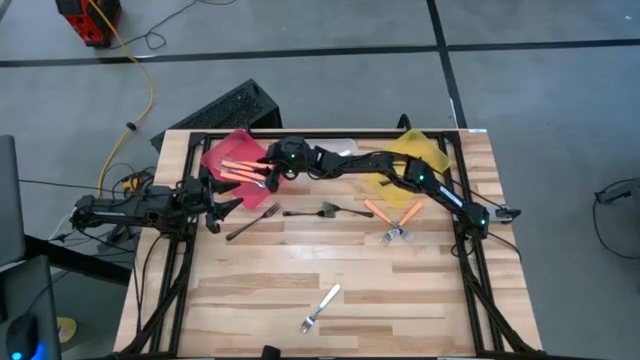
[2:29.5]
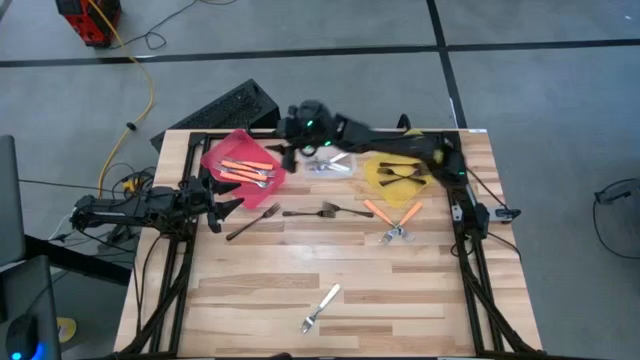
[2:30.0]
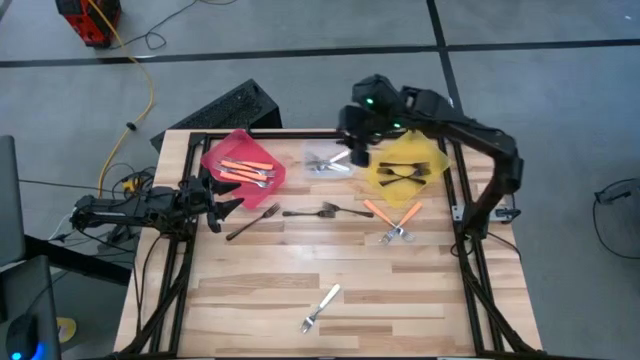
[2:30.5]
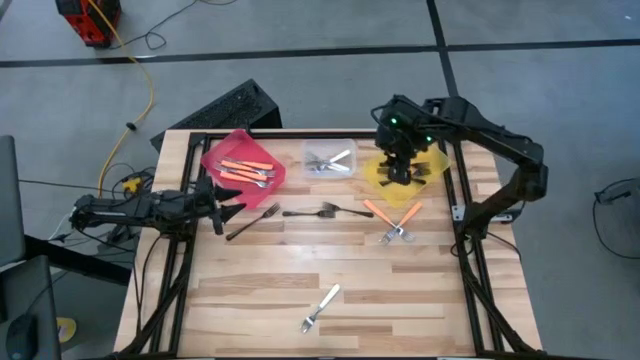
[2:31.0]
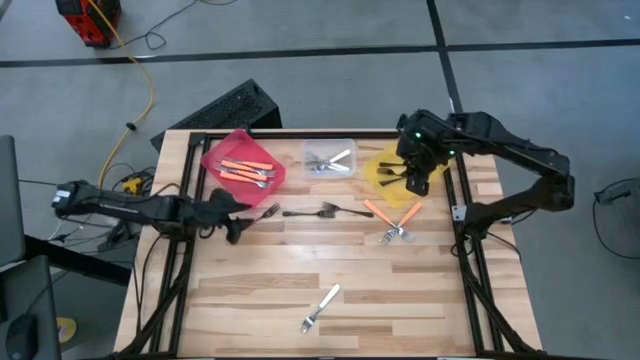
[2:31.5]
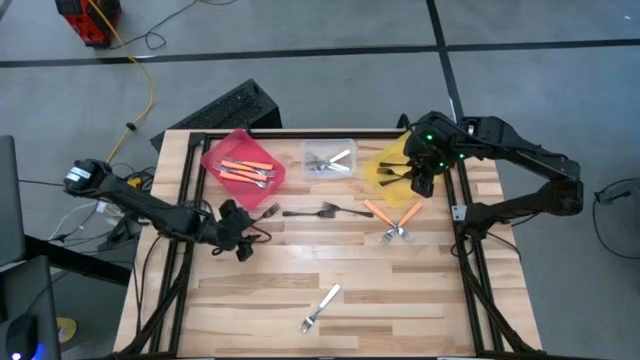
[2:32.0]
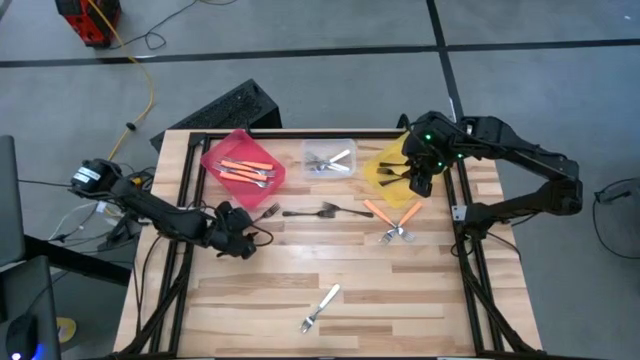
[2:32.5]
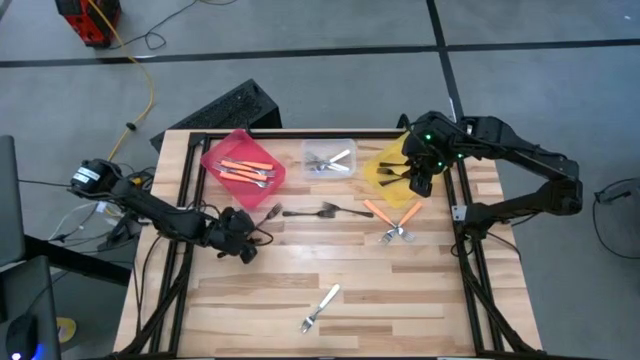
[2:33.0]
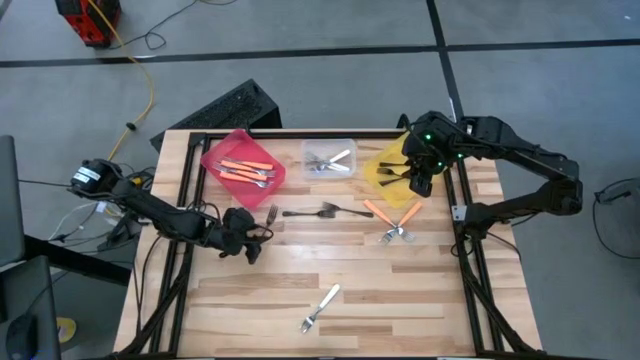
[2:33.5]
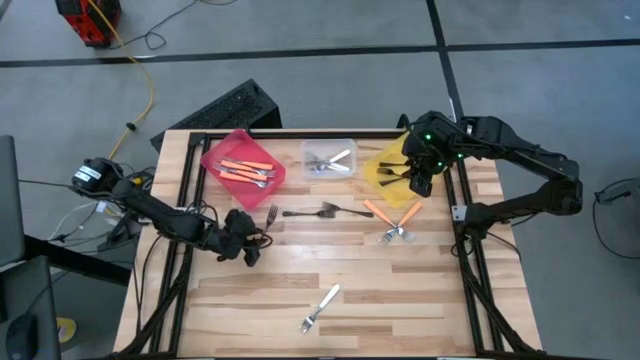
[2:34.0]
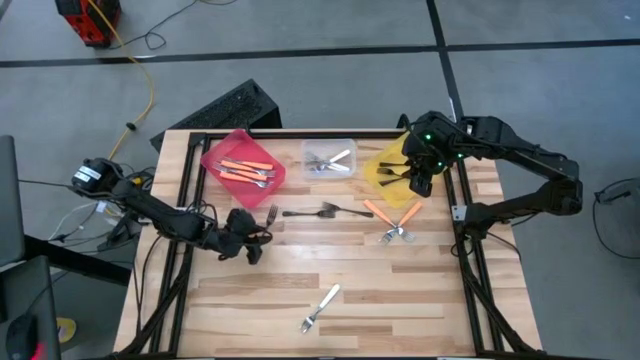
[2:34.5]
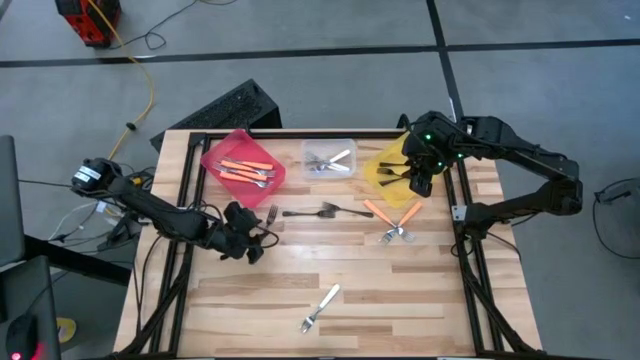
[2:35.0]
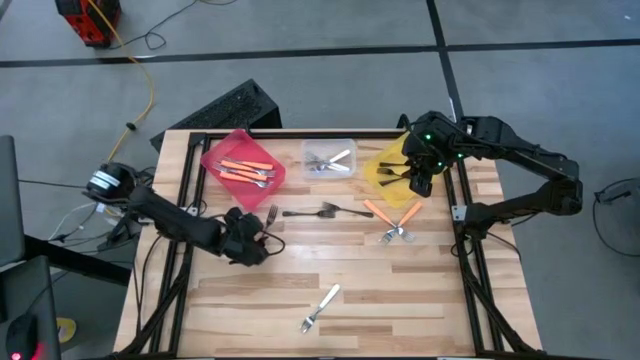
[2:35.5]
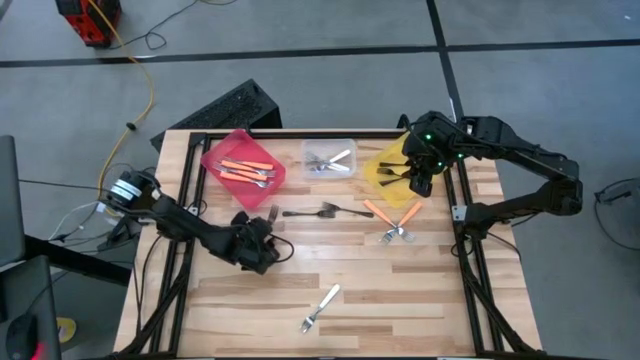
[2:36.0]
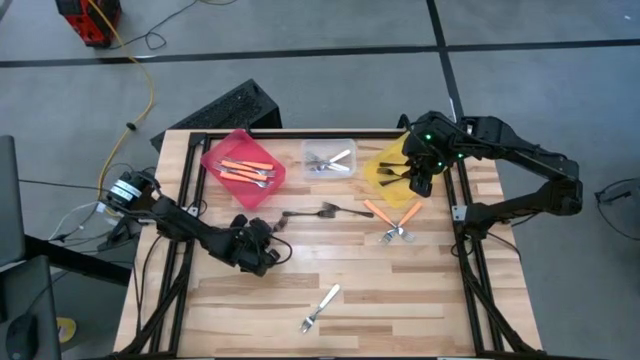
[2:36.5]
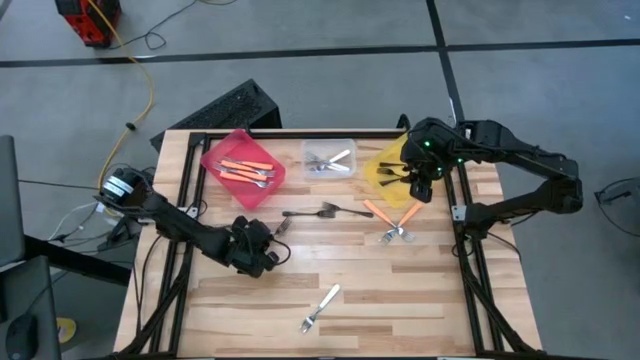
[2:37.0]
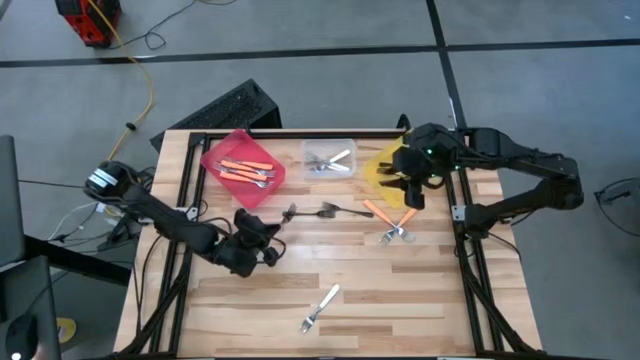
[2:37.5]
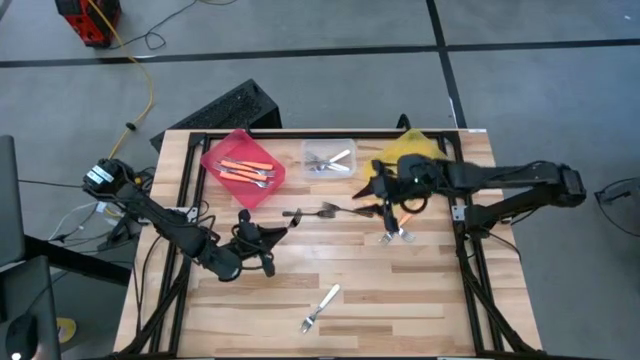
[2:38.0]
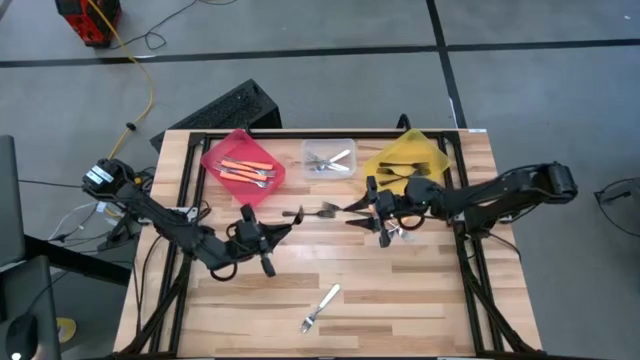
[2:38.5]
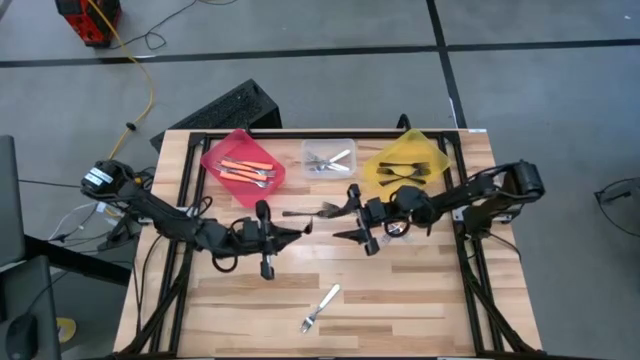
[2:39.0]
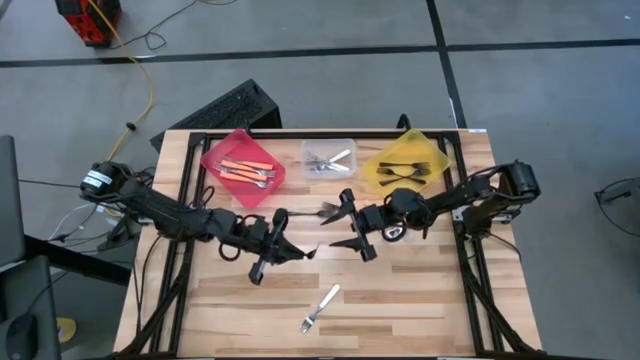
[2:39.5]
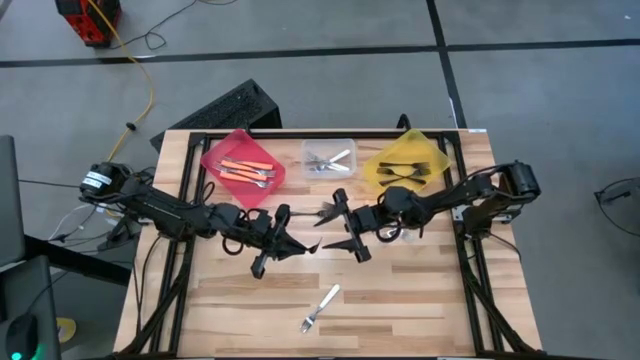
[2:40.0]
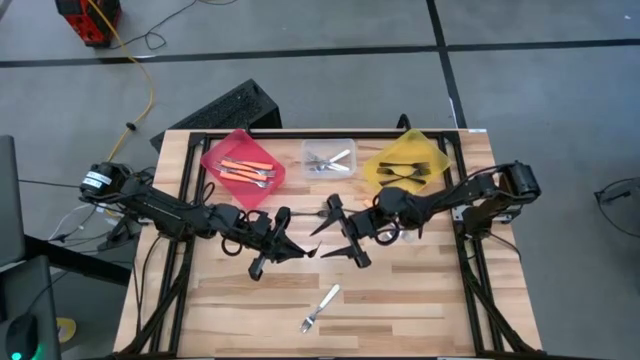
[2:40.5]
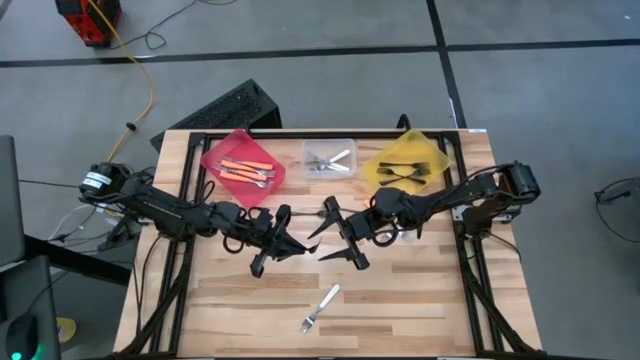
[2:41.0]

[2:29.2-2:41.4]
Task: Sort silverware by color (type)
Put the black fork into the yellow bin

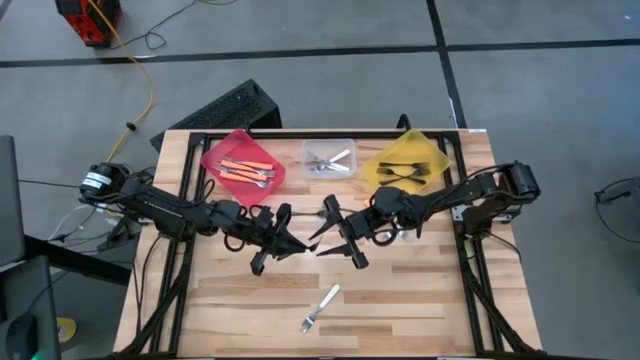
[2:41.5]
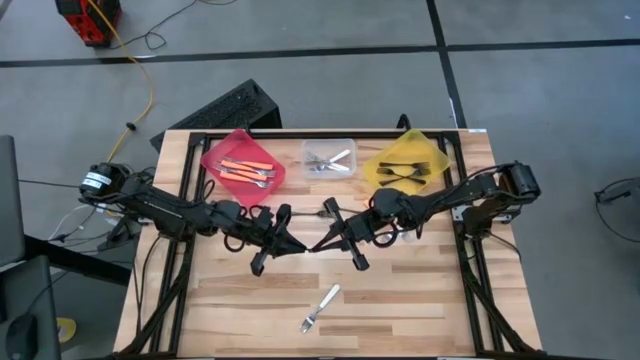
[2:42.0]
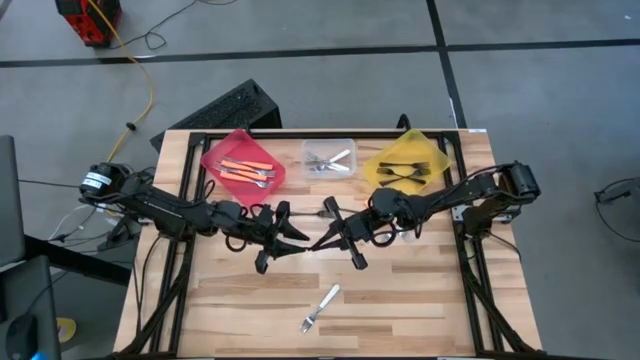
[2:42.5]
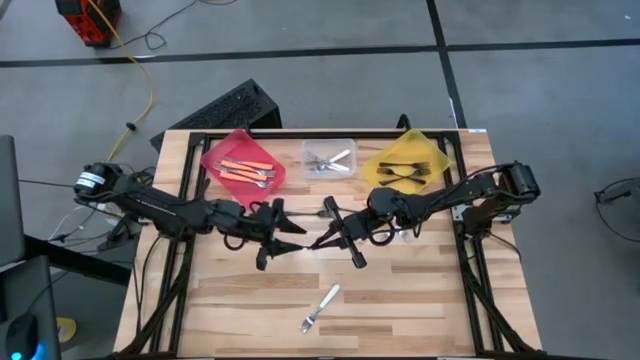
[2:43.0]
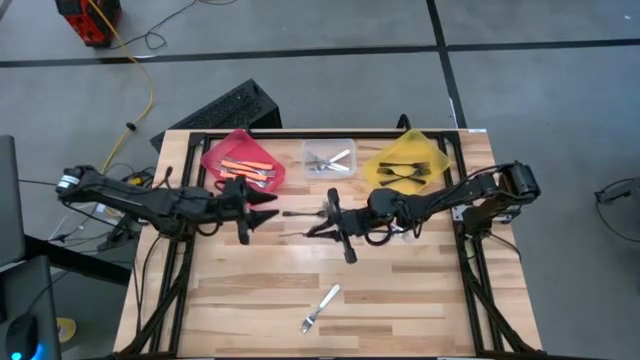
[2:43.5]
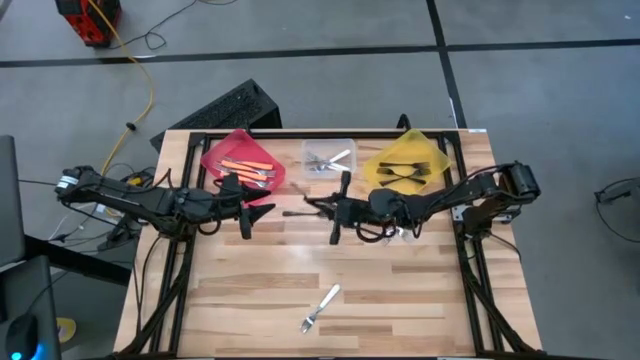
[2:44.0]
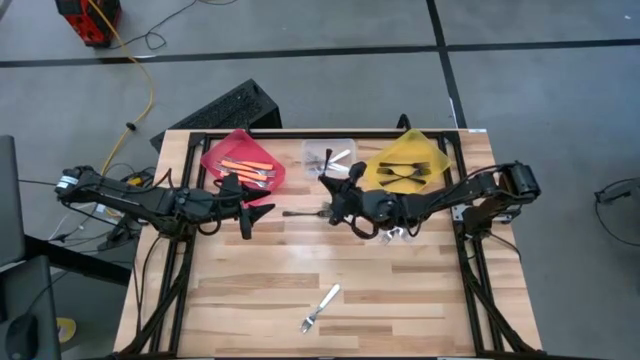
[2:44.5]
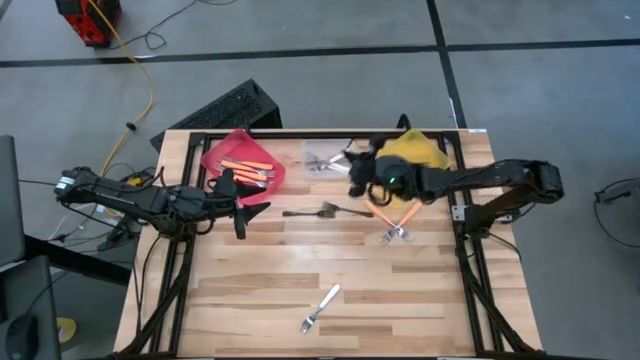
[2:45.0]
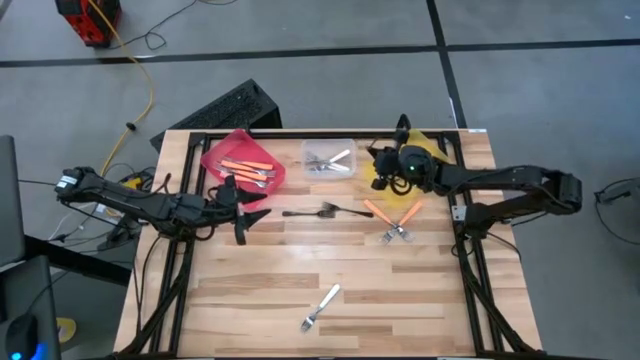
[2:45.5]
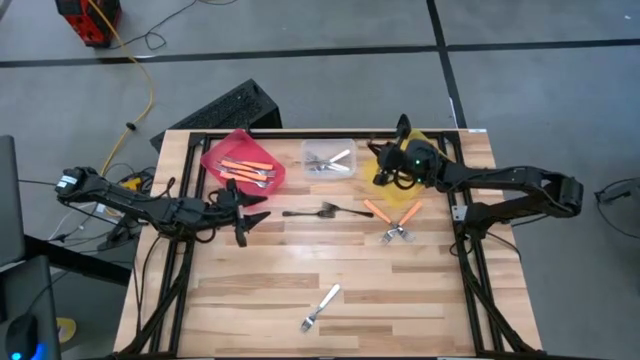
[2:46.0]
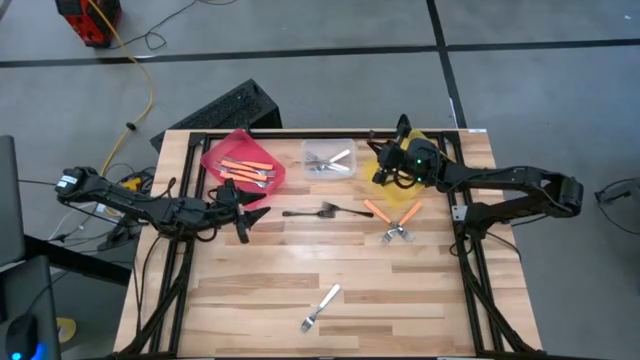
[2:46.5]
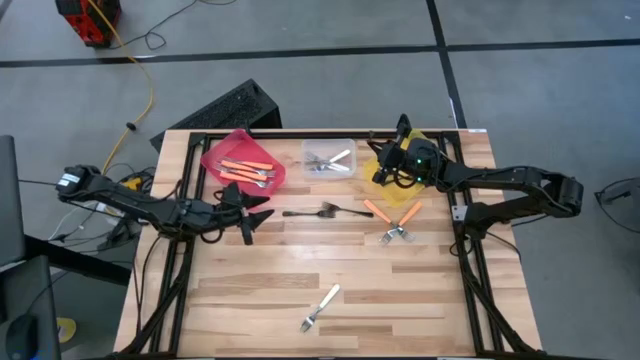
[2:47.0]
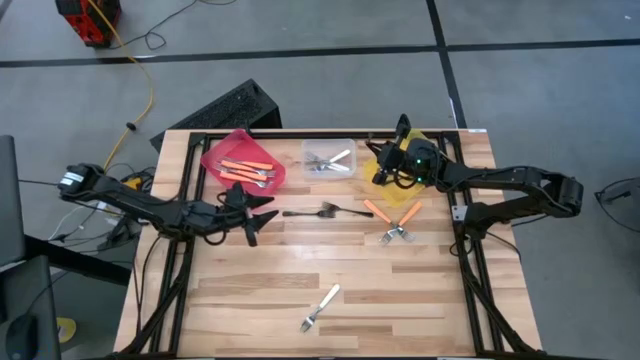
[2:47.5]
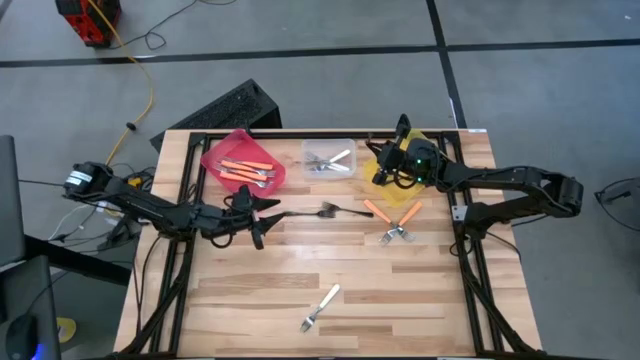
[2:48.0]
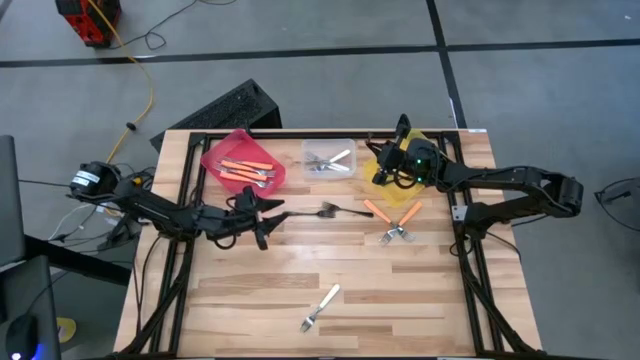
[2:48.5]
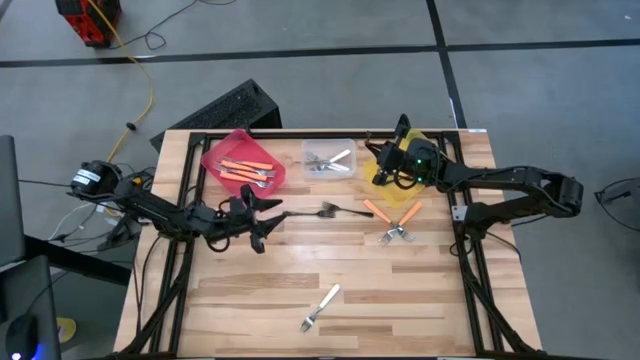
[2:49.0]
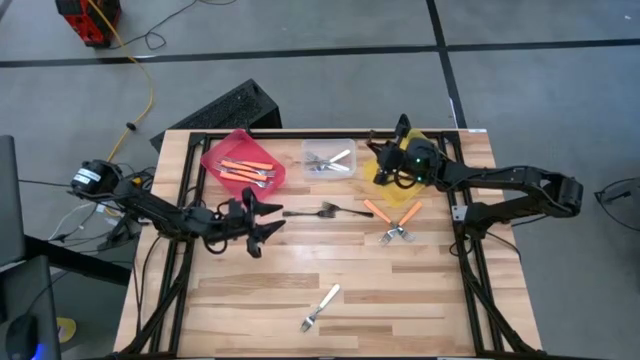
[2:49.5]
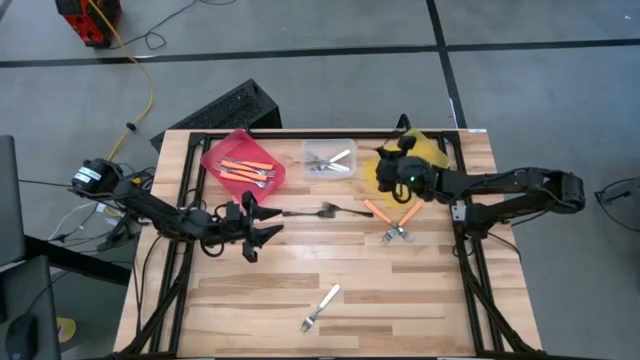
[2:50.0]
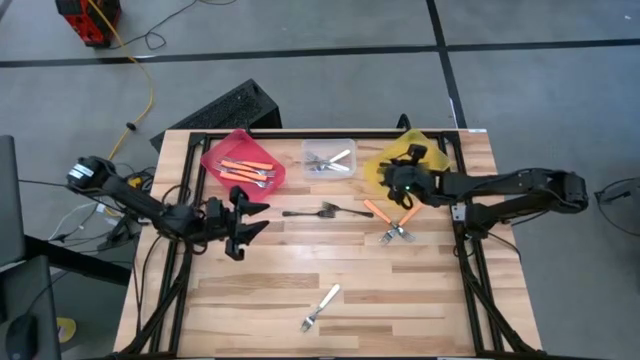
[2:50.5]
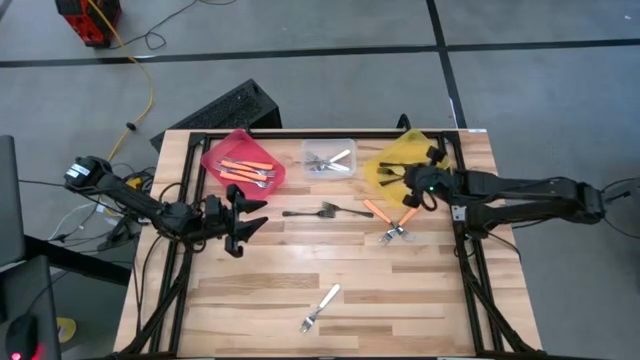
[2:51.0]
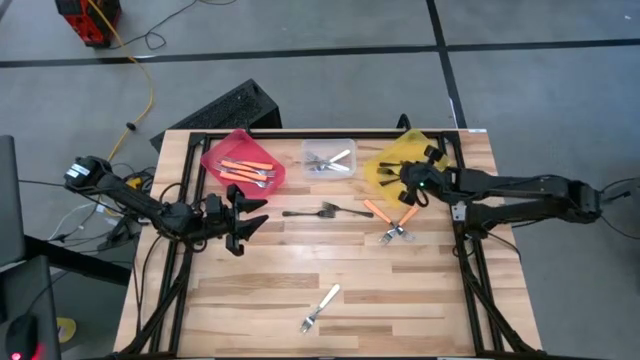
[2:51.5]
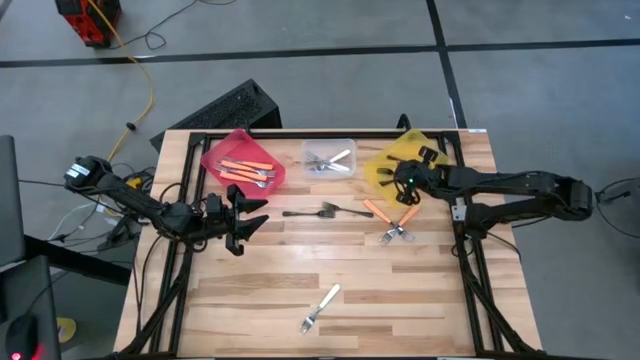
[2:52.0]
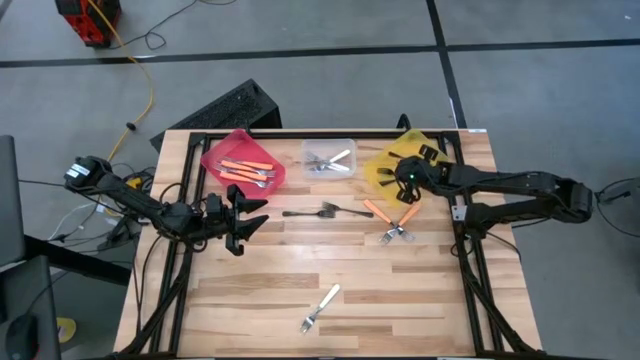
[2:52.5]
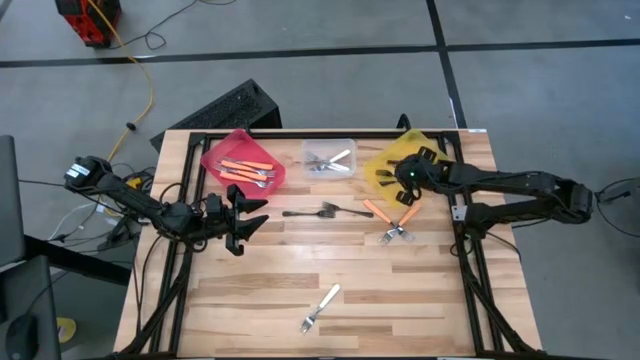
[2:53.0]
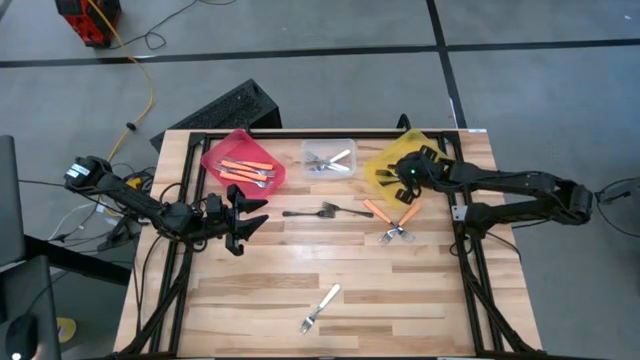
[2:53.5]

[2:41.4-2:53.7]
Put the black fork into the yellow bin
